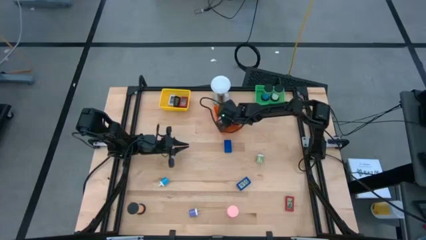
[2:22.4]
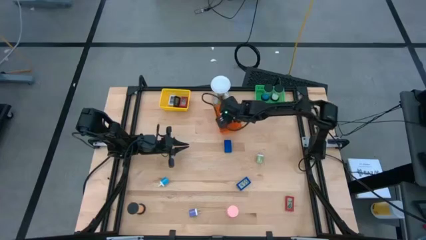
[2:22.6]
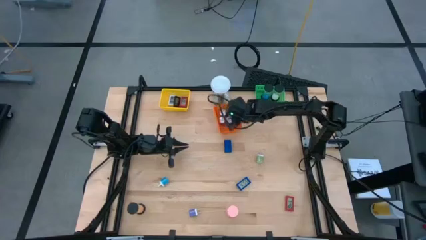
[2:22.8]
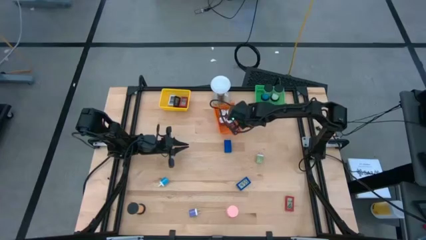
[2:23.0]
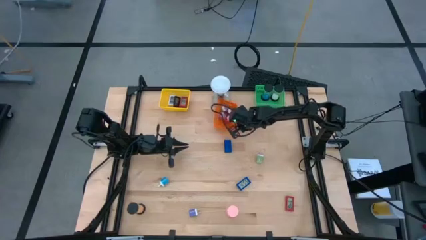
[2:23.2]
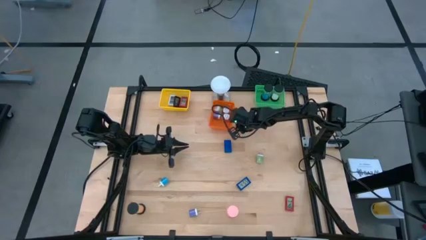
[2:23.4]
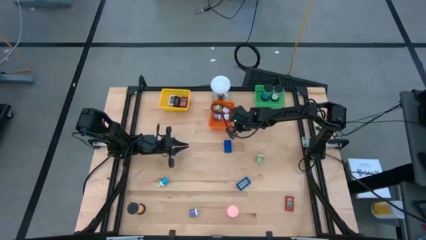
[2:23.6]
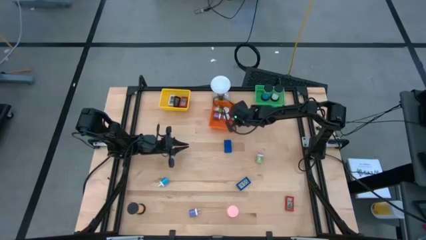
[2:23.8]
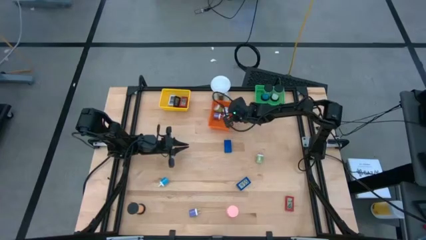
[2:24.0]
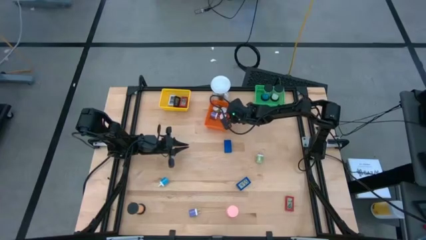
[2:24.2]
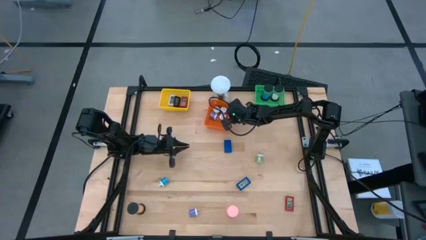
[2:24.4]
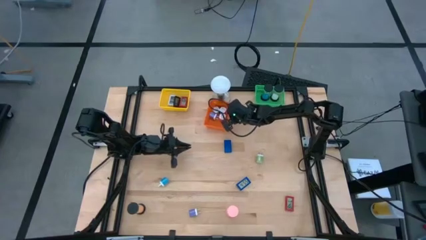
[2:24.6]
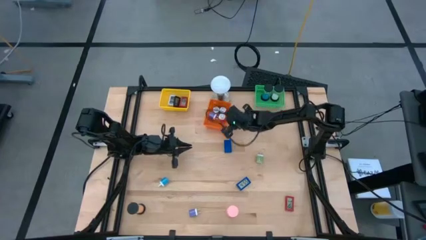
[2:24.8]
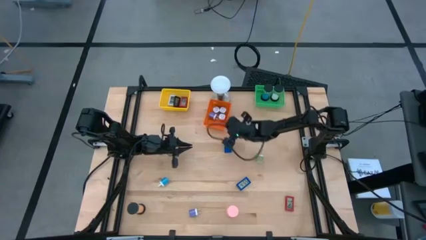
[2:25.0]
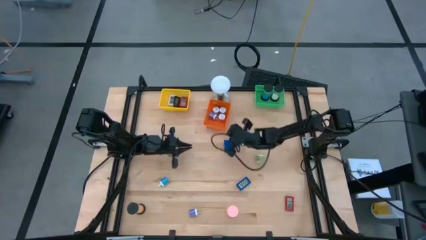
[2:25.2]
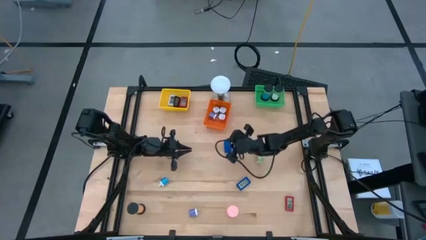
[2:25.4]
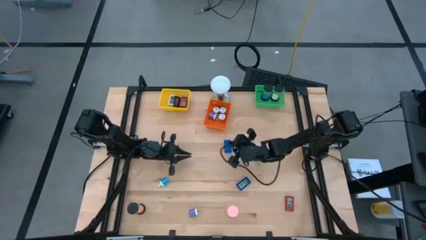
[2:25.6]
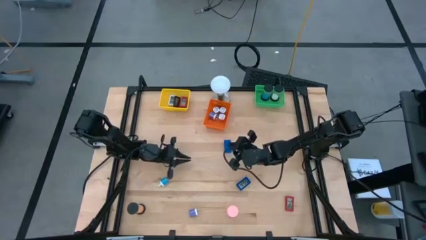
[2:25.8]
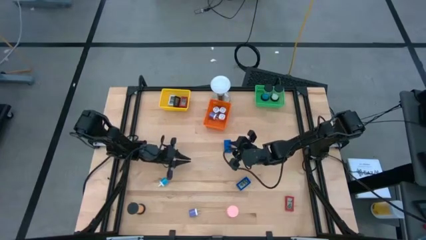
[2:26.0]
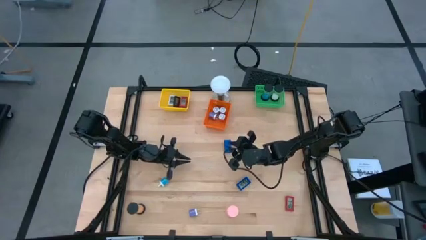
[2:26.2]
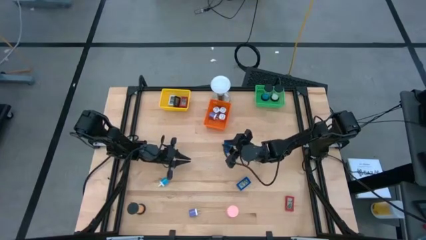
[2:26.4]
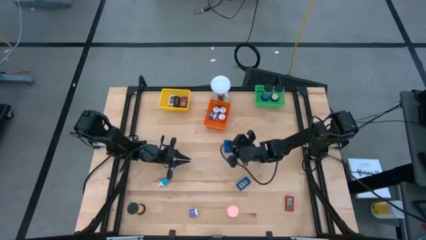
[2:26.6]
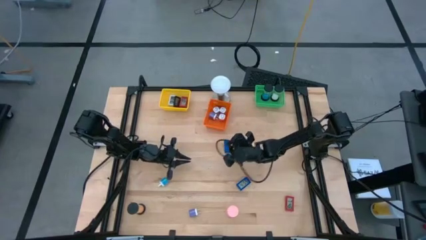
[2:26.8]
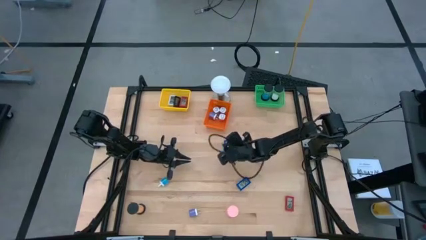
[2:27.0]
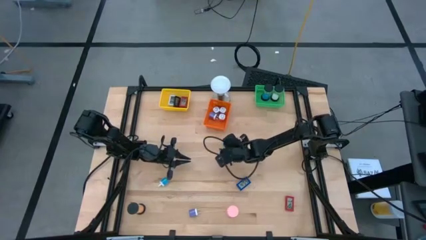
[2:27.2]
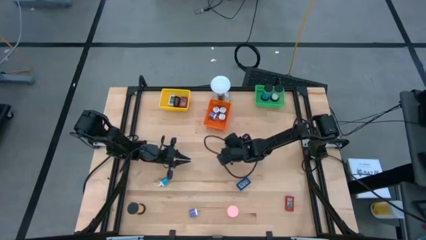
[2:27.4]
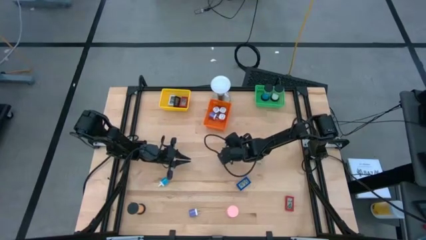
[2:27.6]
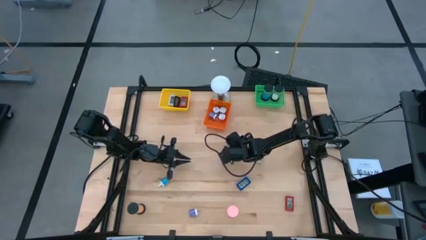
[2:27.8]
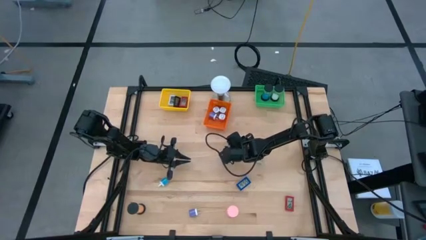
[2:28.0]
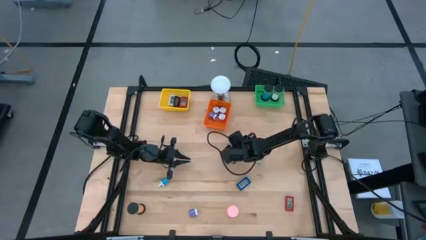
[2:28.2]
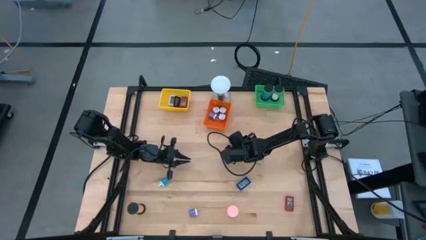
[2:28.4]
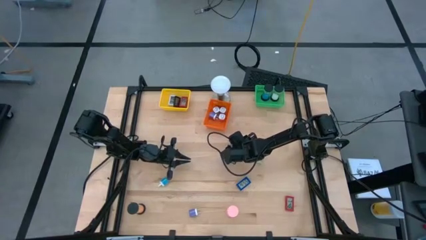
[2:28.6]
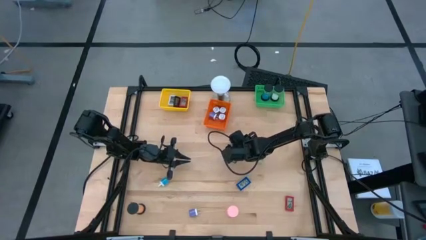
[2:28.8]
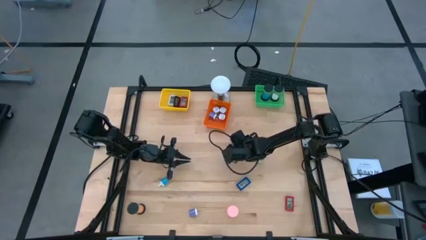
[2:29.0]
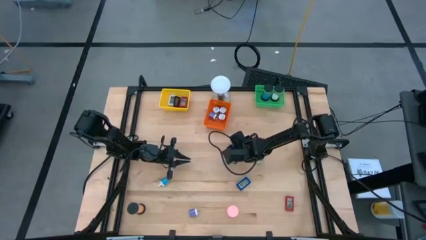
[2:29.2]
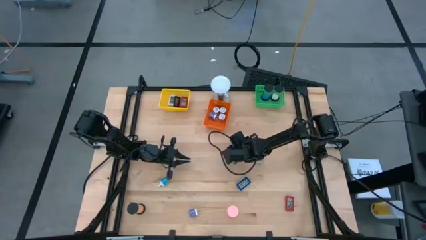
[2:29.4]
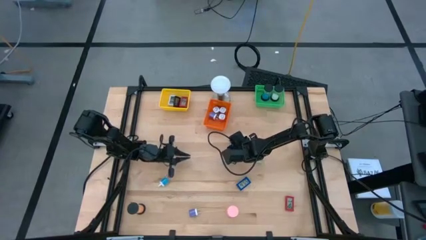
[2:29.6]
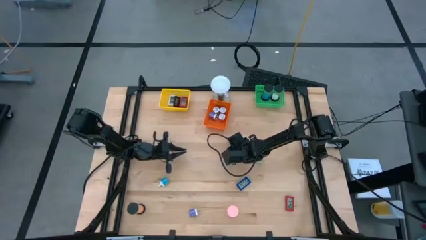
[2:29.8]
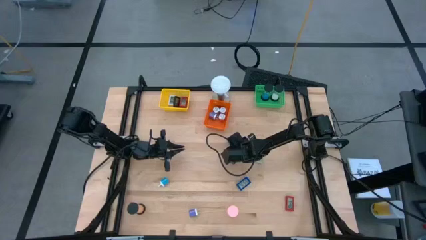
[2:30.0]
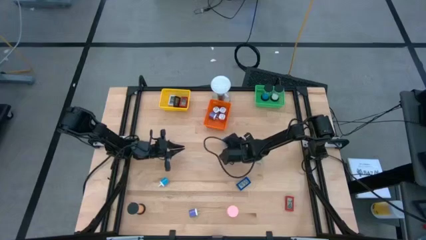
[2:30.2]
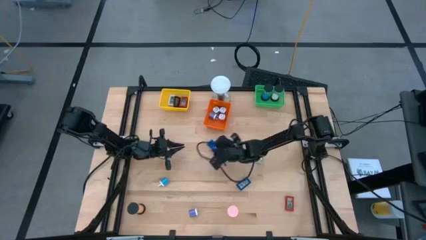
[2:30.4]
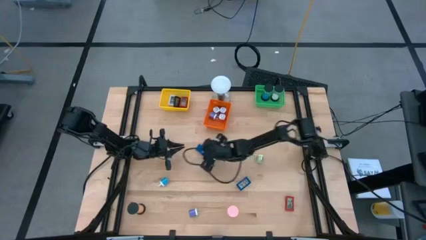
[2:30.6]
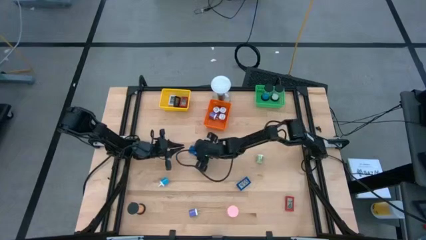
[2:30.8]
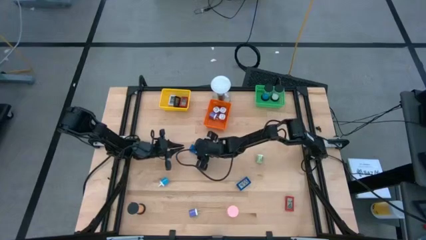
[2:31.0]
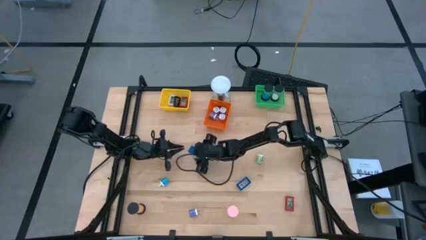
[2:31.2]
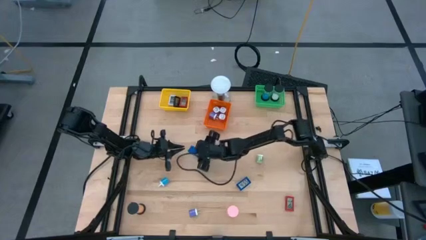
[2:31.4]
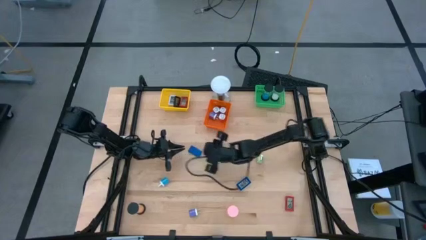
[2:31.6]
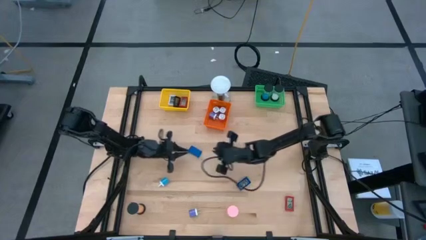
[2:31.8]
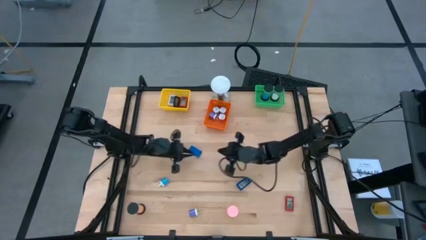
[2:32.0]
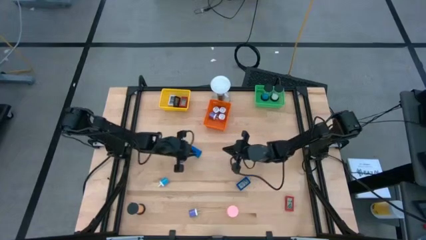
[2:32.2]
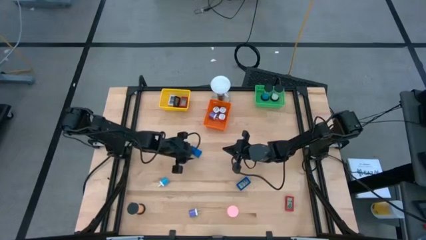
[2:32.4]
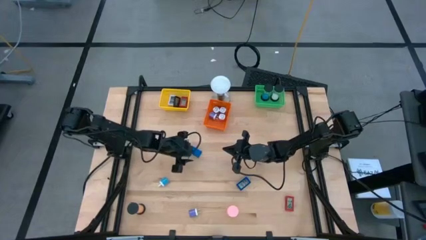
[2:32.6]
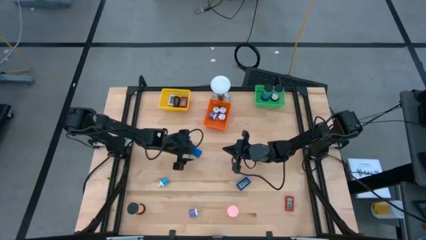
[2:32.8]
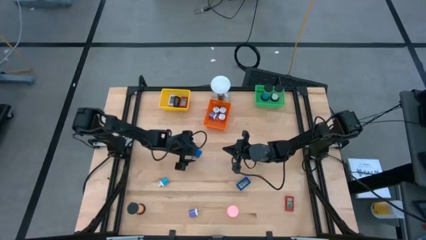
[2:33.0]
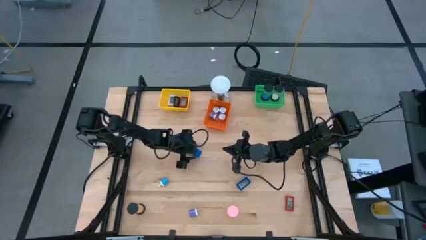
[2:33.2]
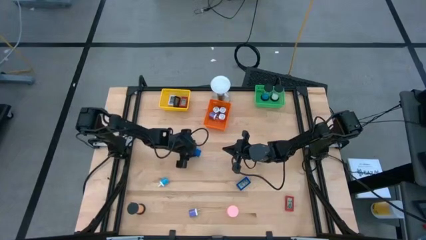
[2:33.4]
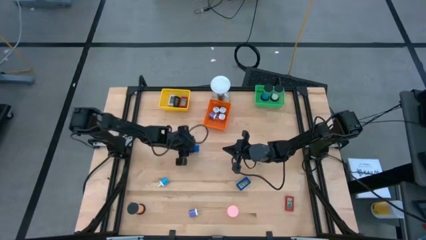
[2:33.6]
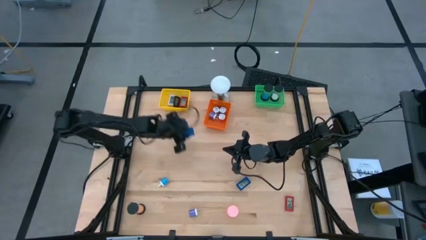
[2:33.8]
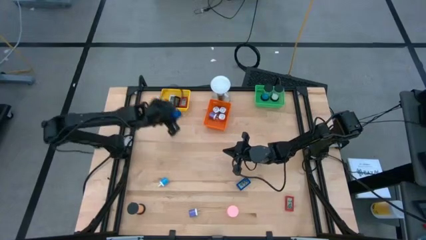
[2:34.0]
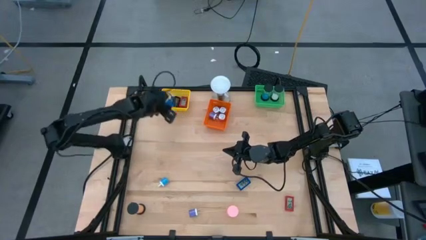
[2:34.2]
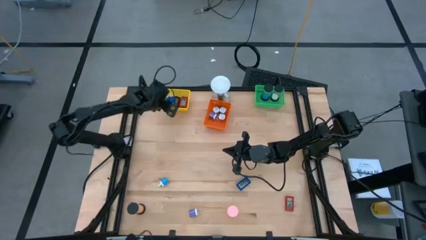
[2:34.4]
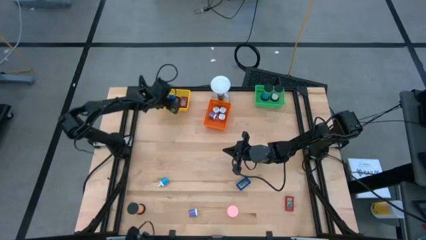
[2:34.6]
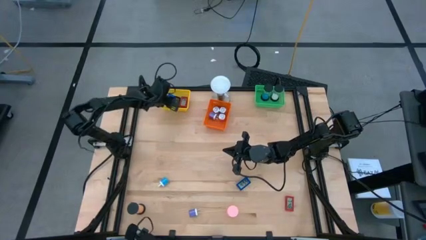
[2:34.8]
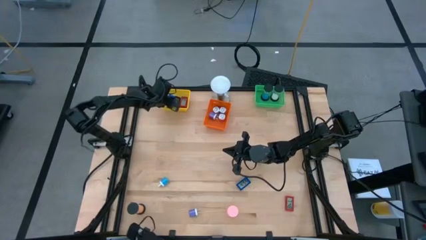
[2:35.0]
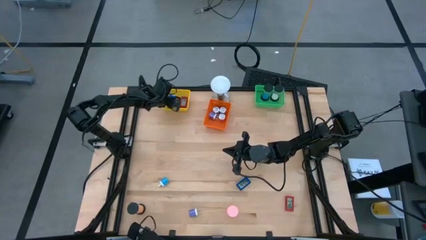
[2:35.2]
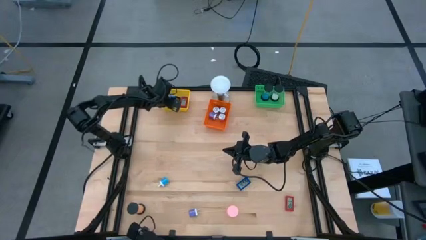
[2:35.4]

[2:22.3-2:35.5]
Task: Pick & Place Office items
Put the top blue digital clock into the yellow bin
